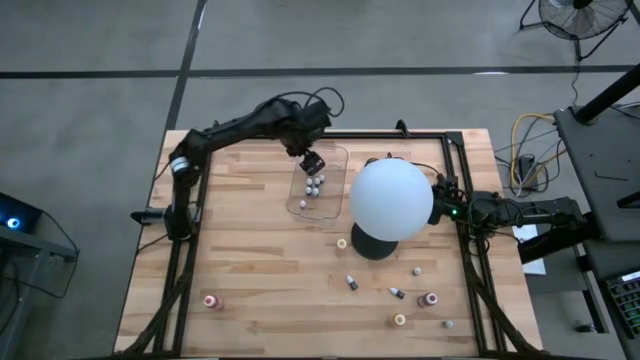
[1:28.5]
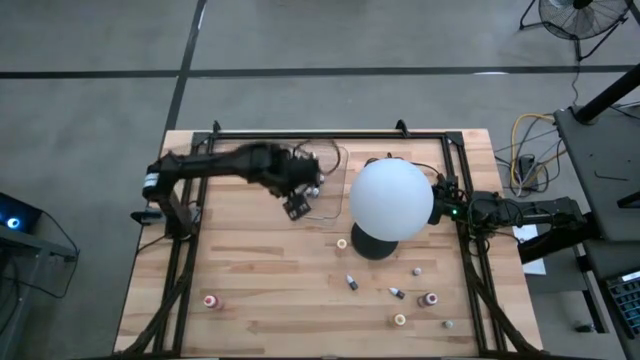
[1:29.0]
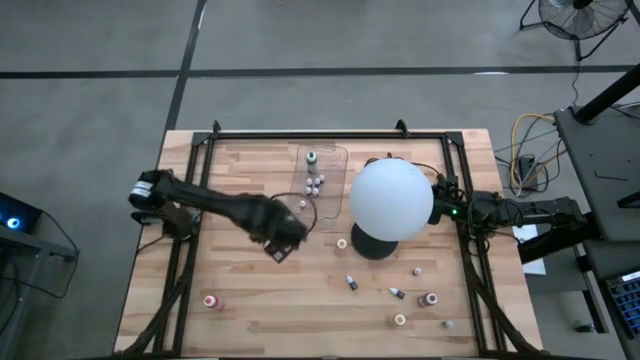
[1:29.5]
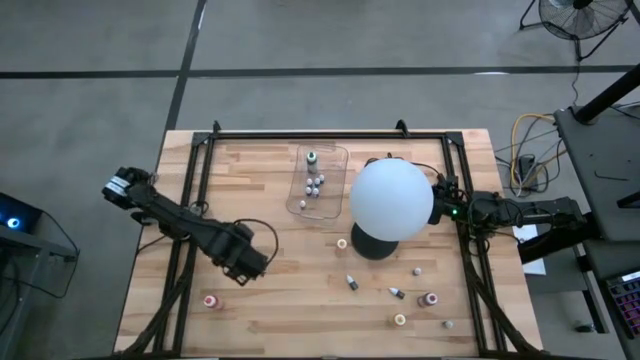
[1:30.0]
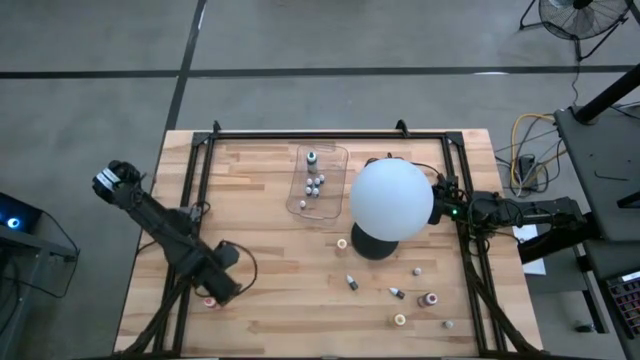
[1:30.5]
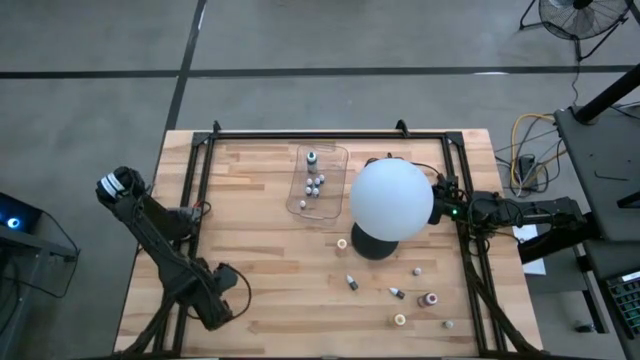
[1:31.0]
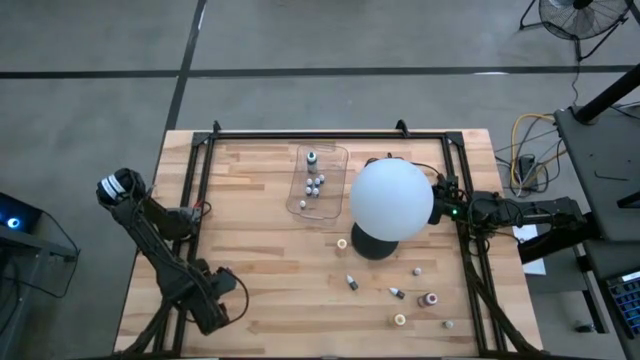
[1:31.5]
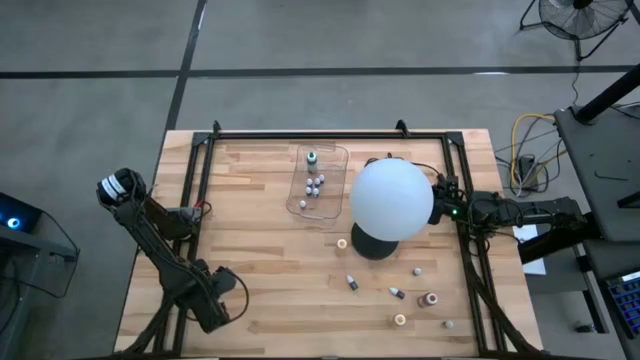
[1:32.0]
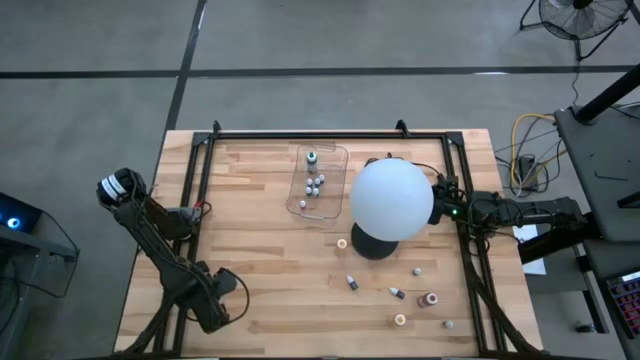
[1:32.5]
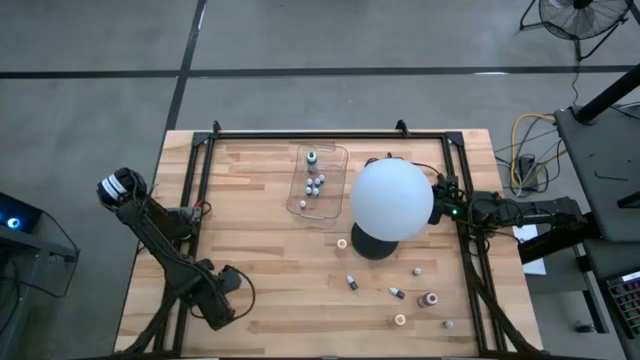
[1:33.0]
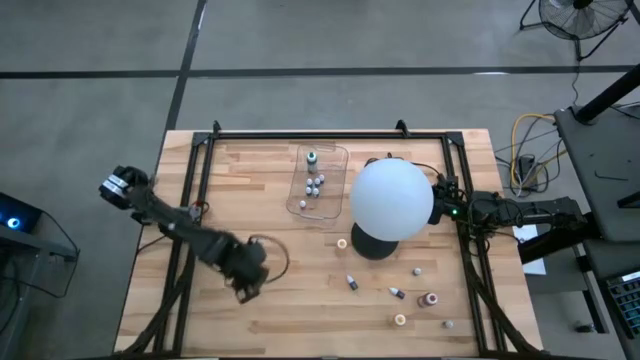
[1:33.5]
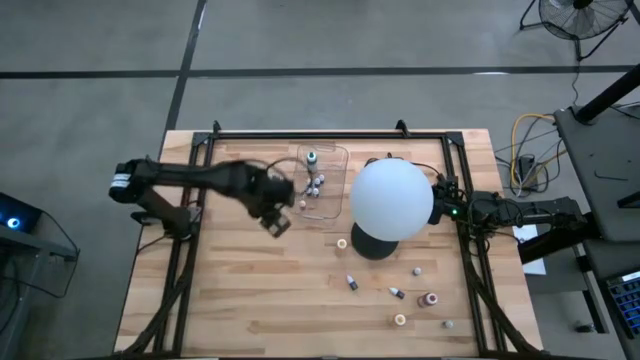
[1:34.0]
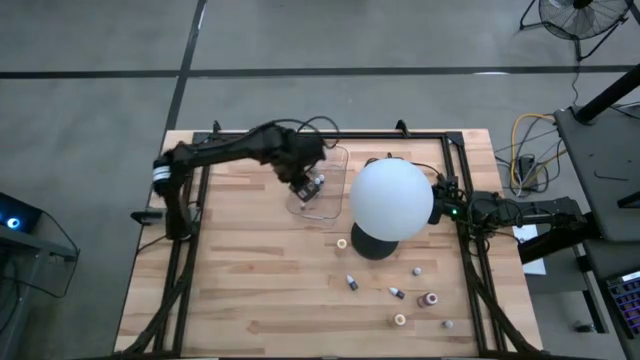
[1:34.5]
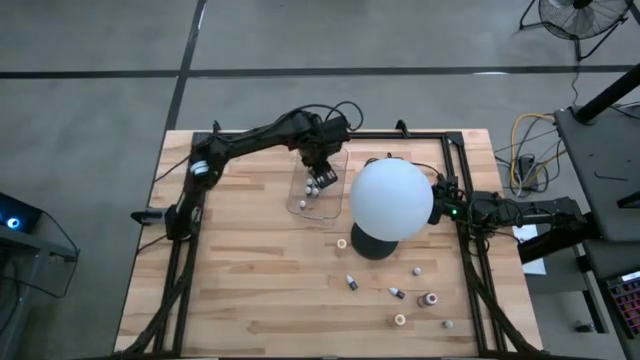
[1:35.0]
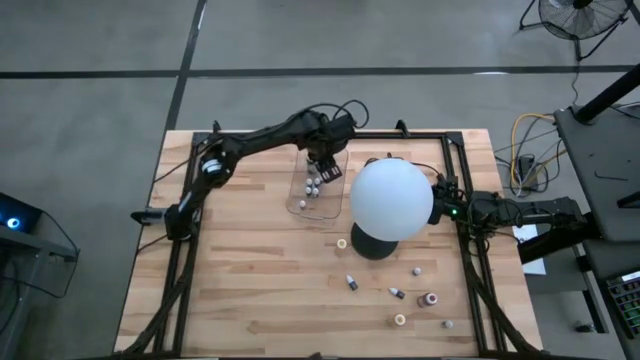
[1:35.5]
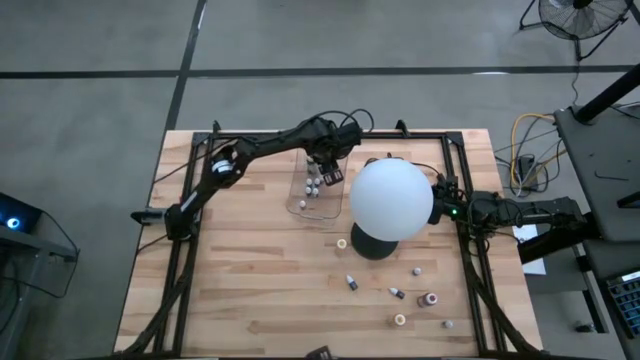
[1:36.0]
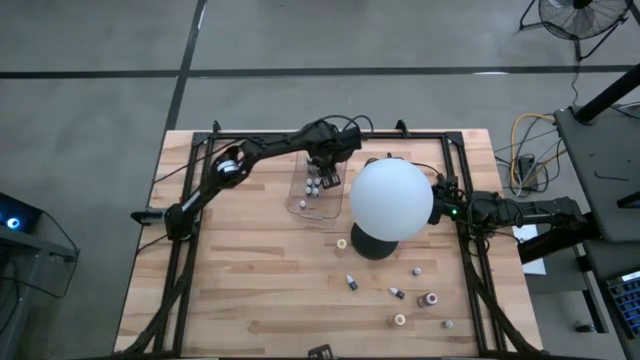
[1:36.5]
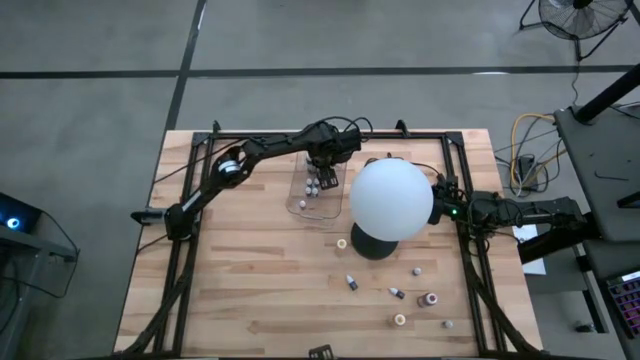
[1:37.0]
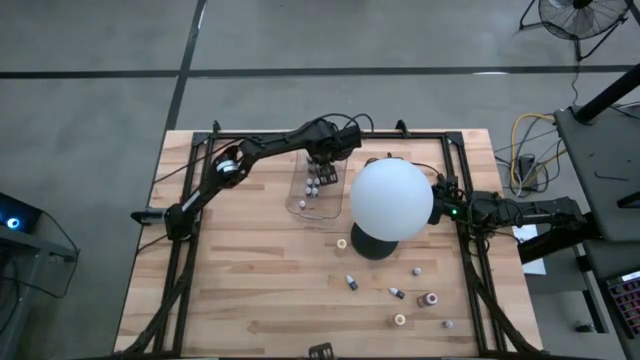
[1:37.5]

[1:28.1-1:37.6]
Task: Pick & Place food coloring
Put the large orange food coloring bottle into the transparent bin

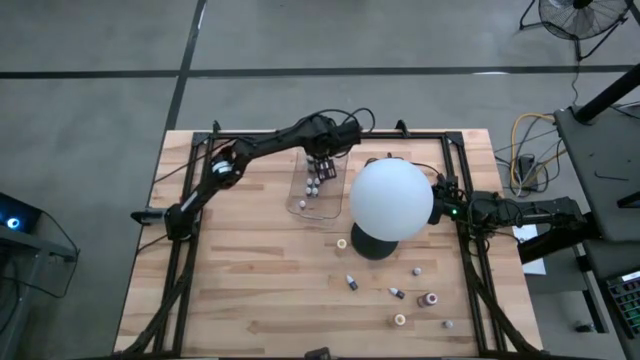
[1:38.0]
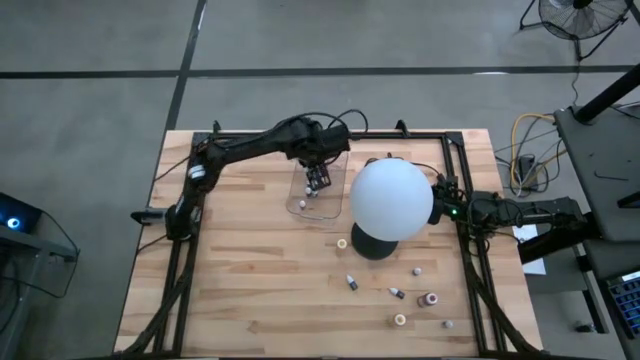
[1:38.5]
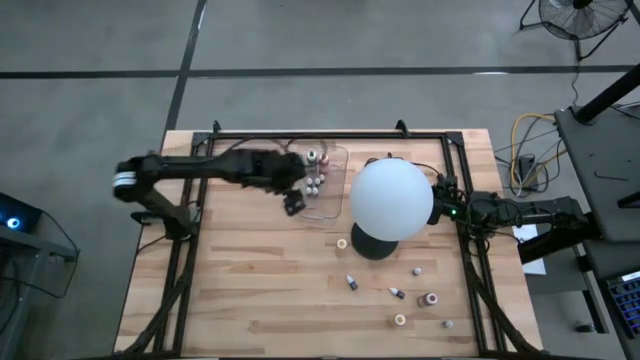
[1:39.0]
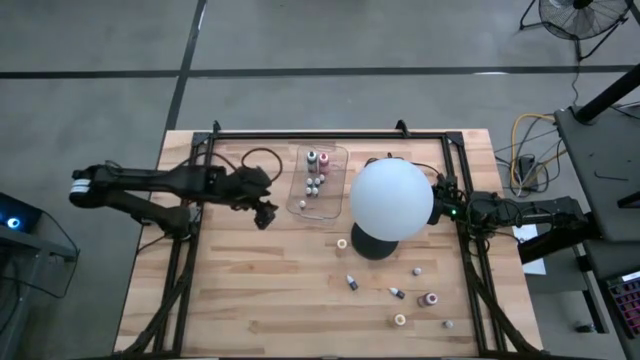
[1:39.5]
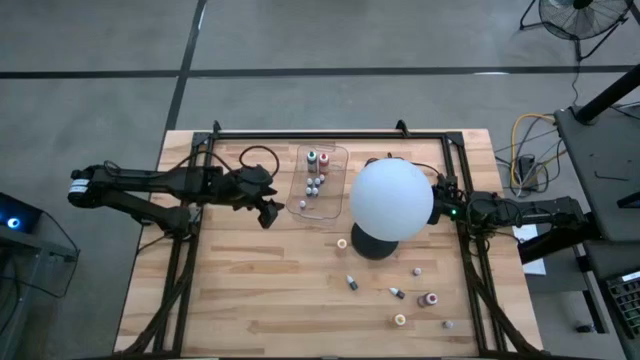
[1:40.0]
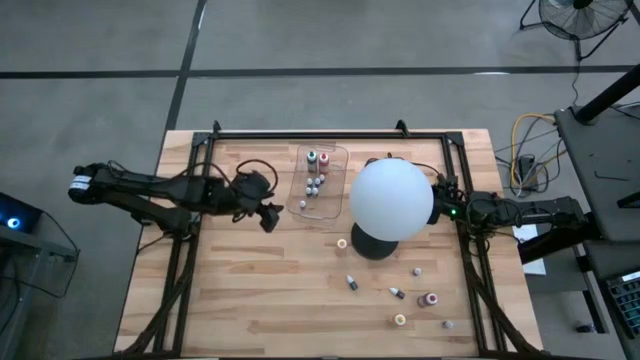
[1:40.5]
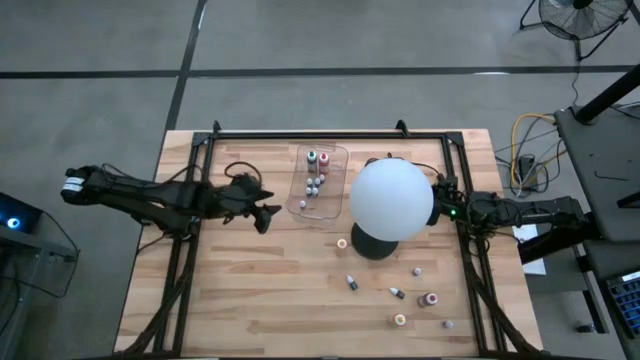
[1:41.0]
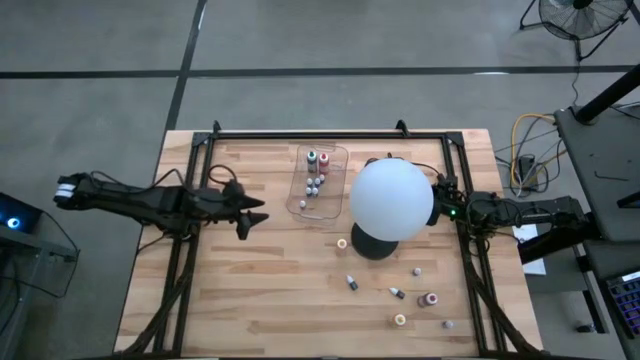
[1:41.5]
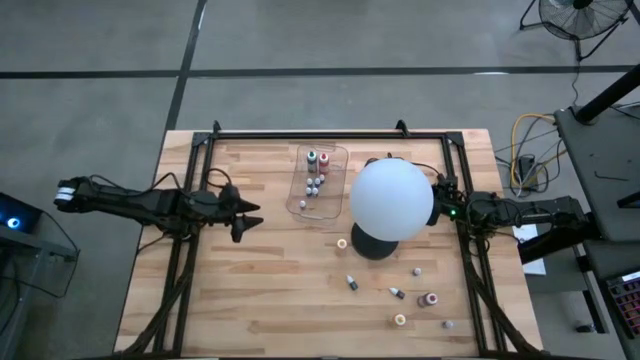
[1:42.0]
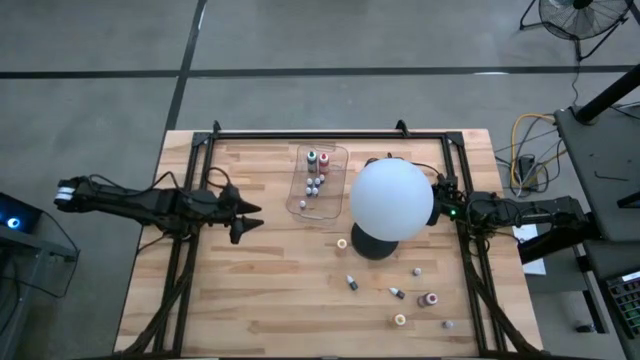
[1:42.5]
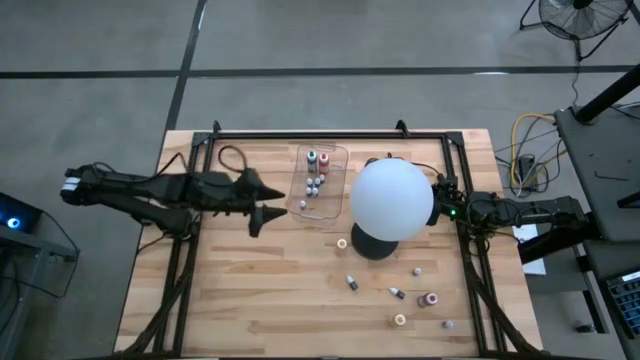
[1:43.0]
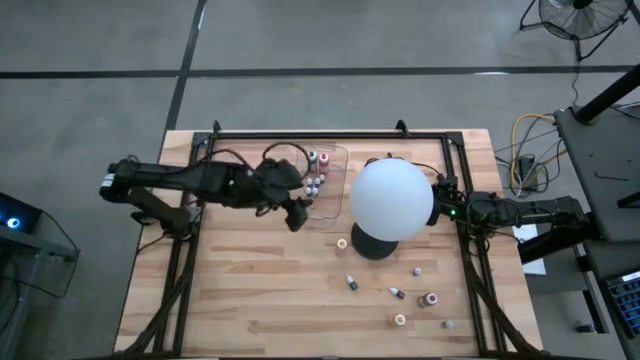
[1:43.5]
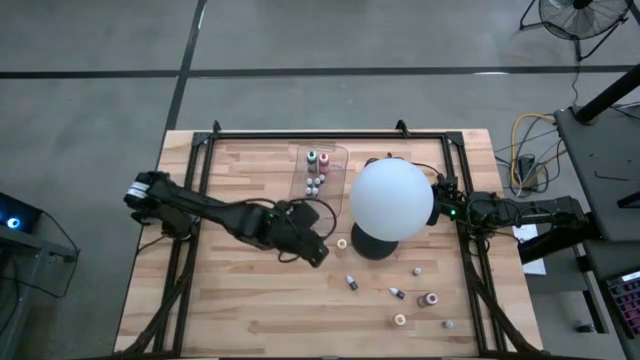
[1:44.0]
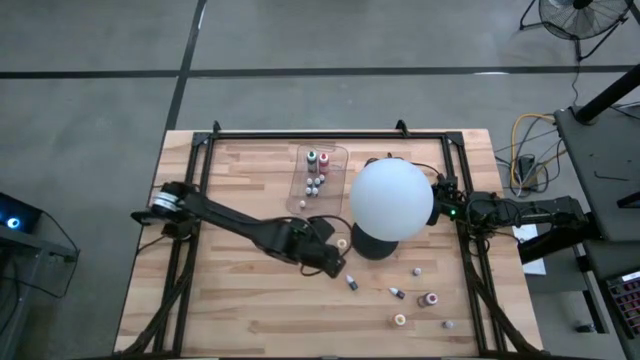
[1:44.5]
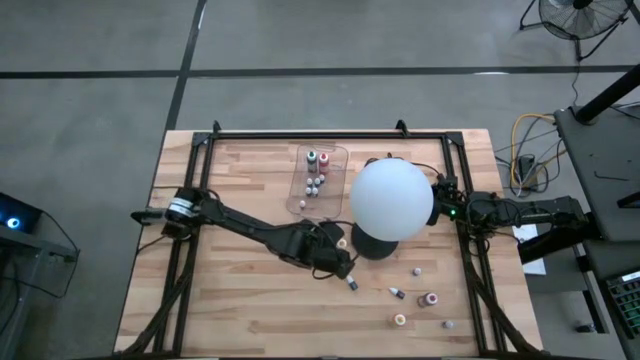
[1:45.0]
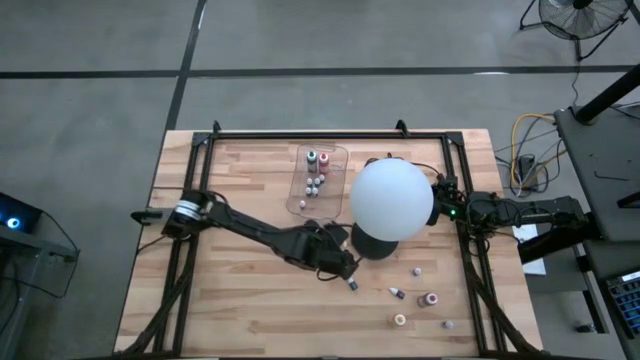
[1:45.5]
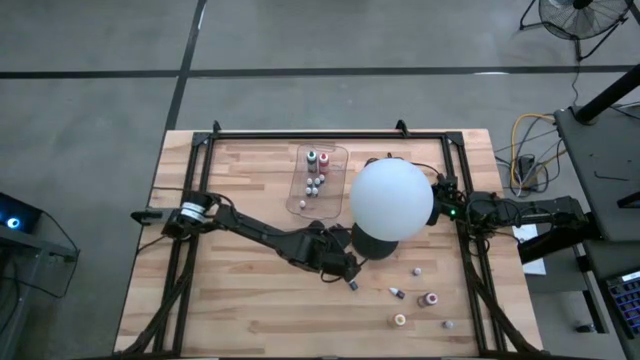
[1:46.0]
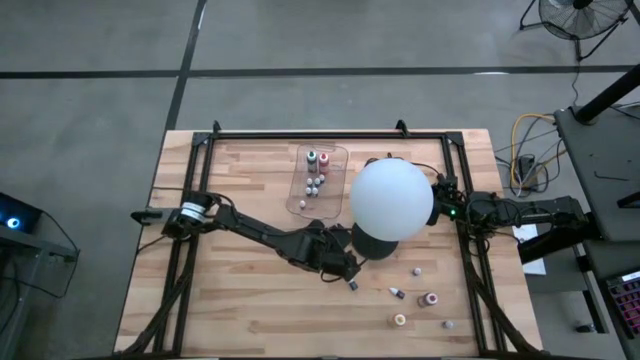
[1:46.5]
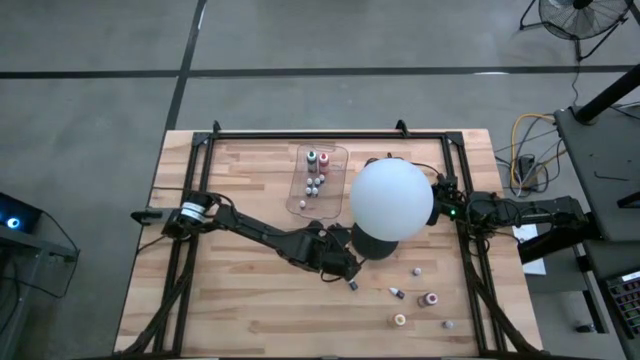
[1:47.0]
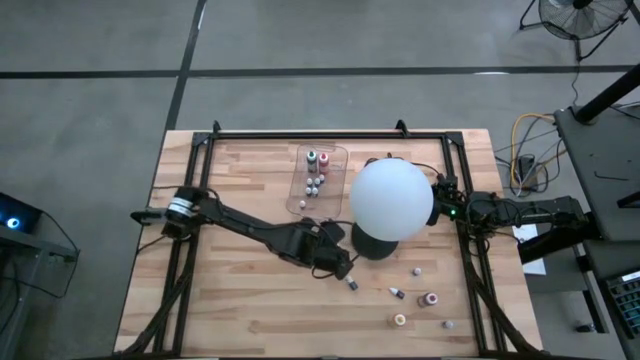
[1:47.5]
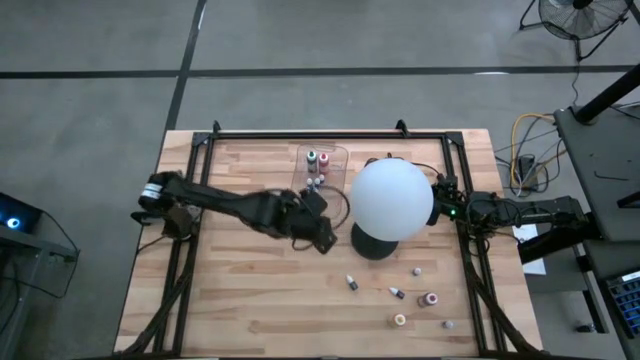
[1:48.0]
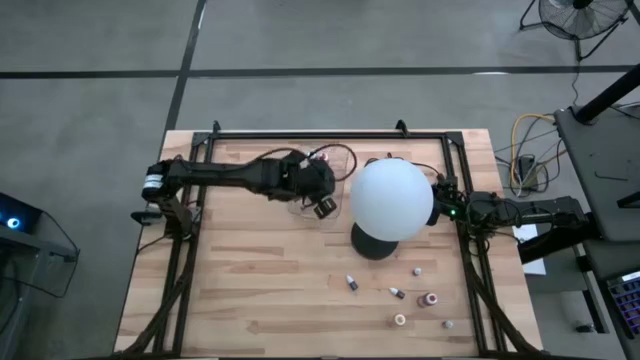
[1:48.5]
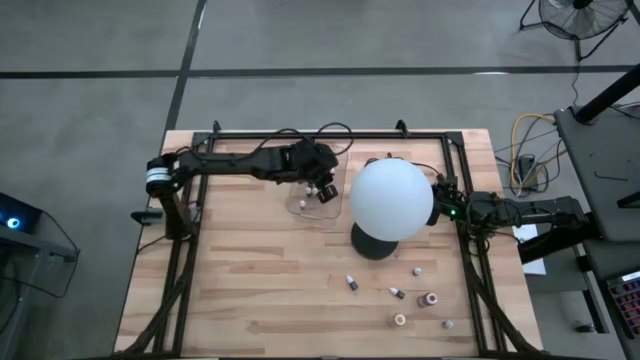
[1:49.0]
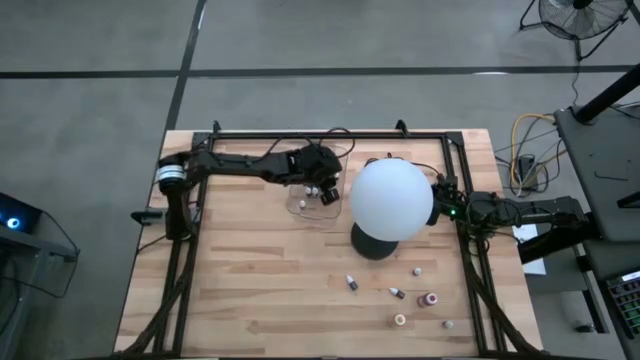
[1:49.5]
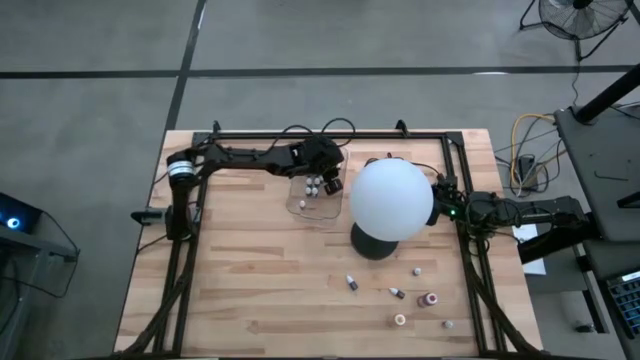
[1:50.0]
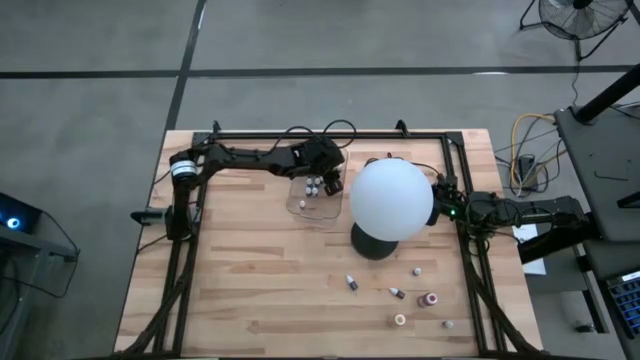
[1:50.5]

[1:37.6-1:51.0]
Put the large yellow food coloring bottle into the transparent bin
